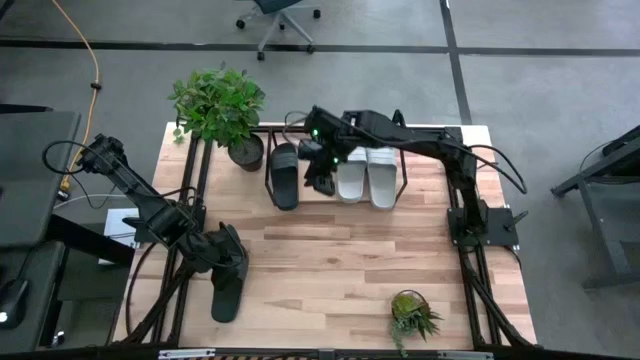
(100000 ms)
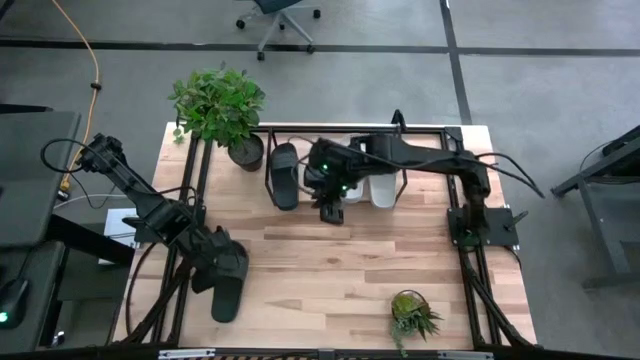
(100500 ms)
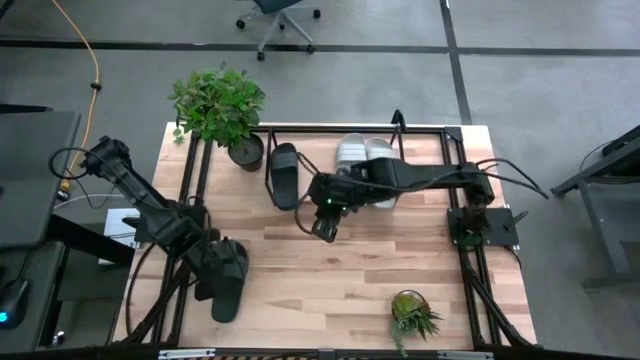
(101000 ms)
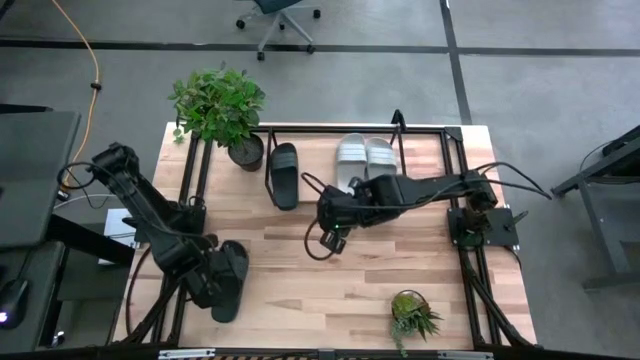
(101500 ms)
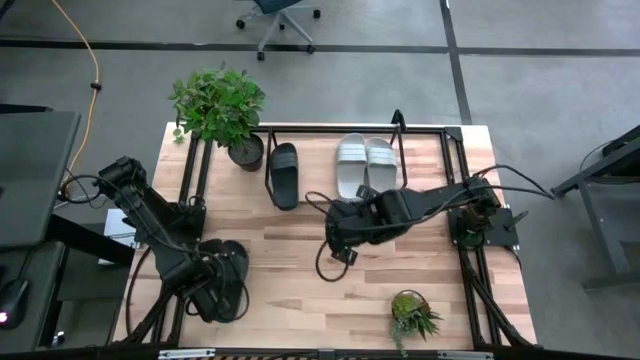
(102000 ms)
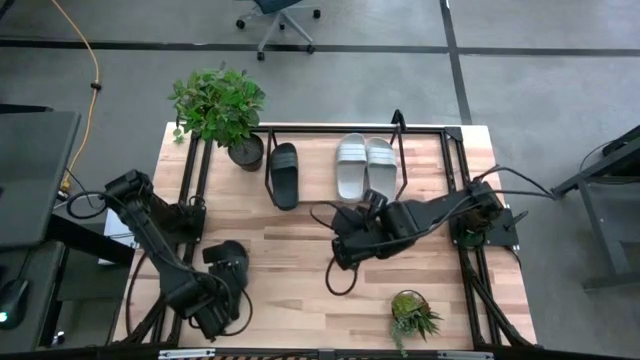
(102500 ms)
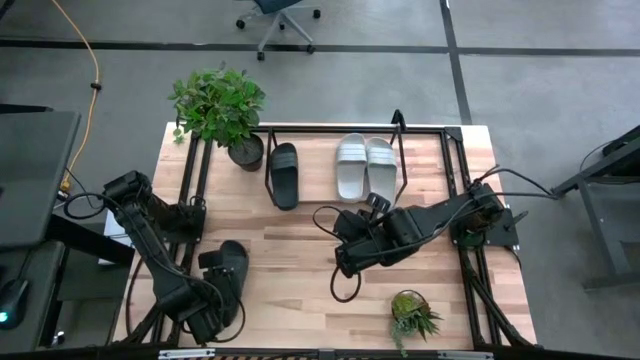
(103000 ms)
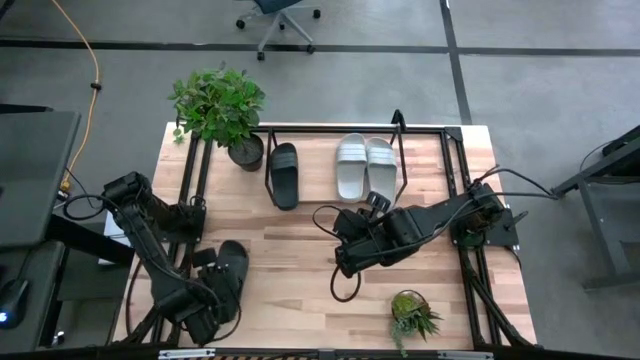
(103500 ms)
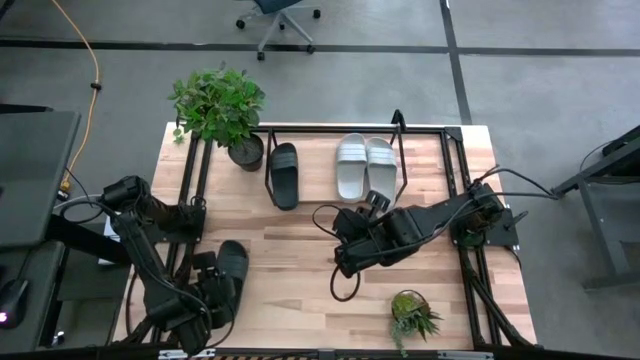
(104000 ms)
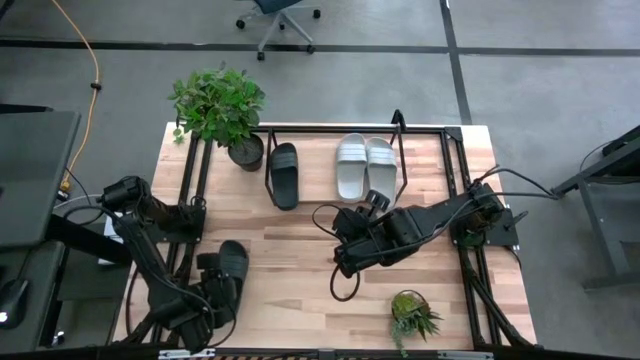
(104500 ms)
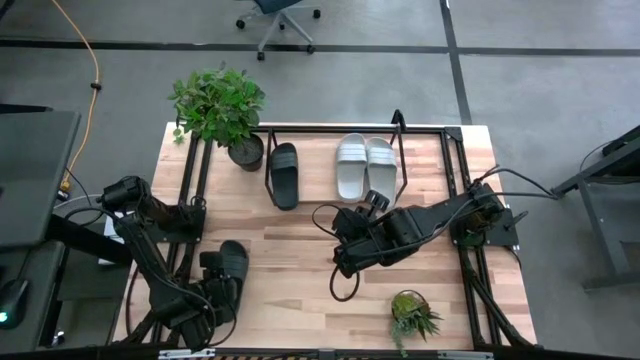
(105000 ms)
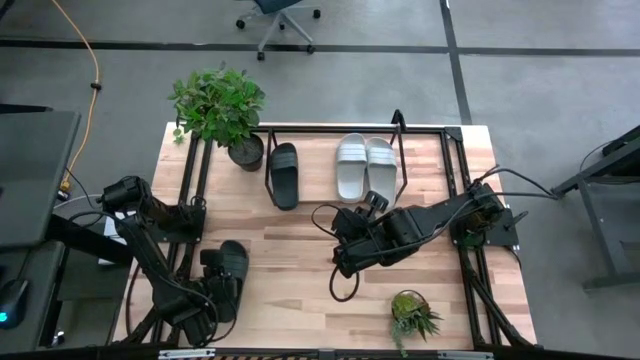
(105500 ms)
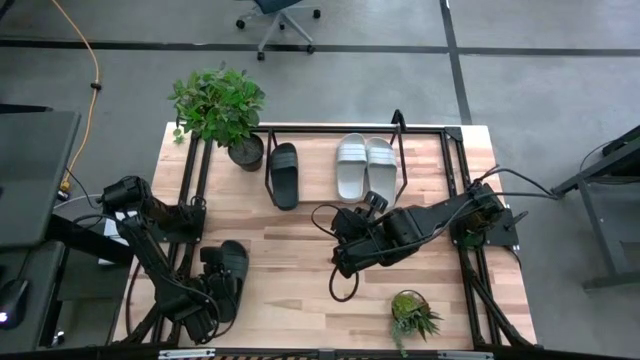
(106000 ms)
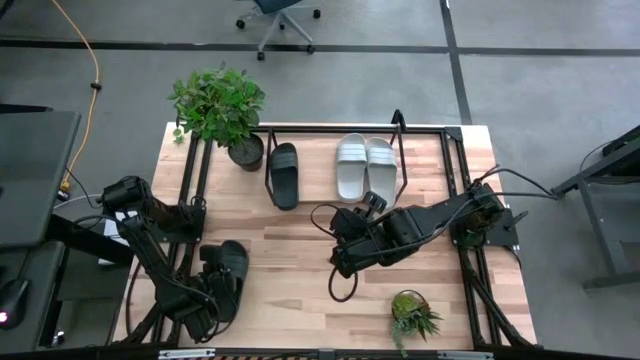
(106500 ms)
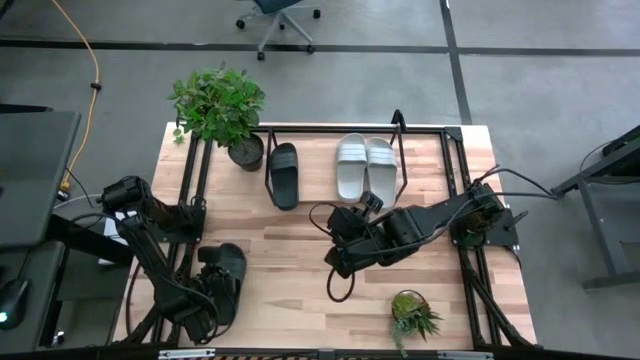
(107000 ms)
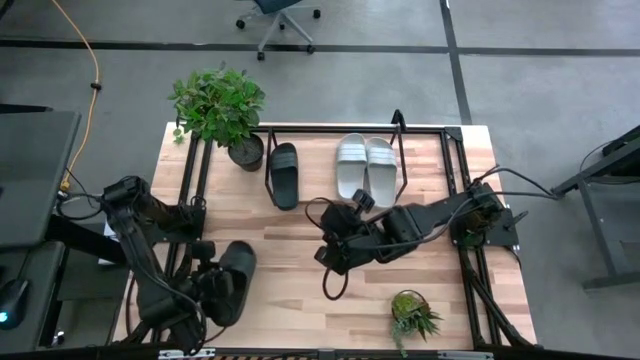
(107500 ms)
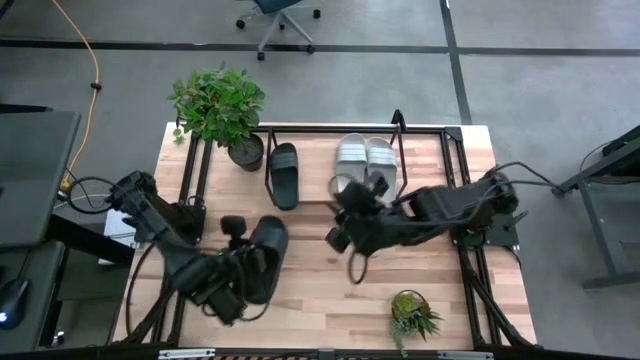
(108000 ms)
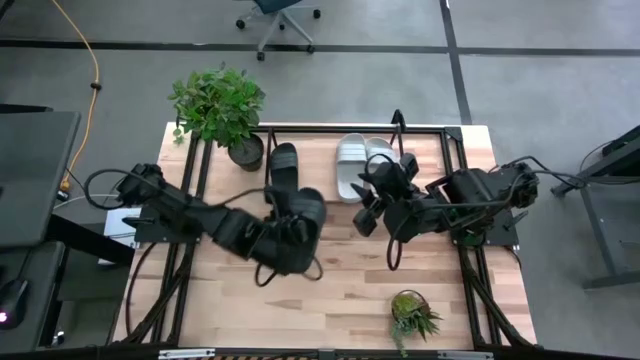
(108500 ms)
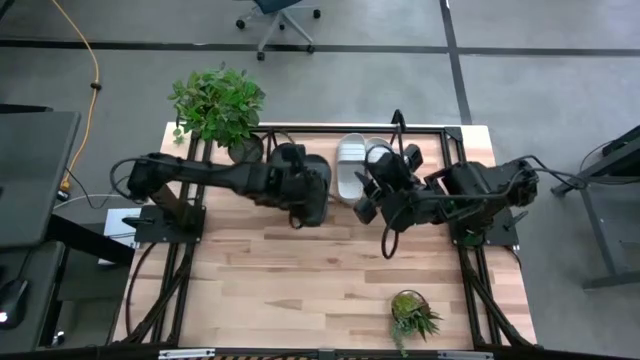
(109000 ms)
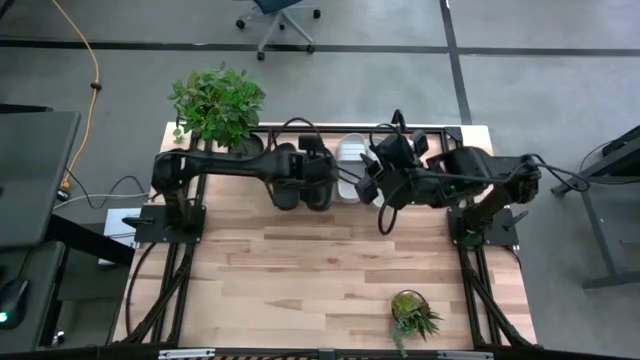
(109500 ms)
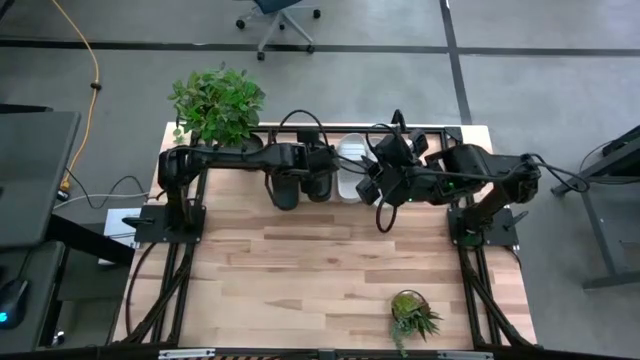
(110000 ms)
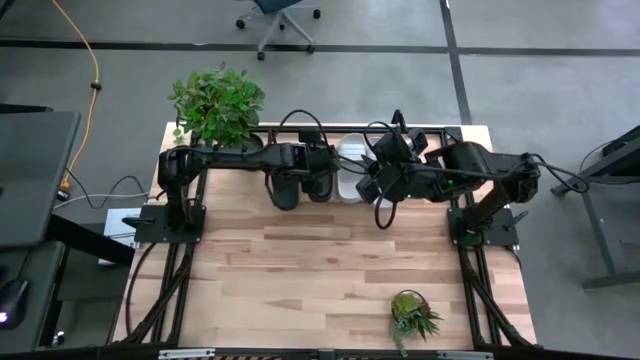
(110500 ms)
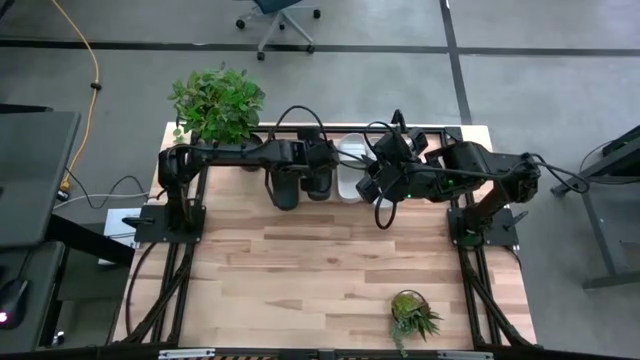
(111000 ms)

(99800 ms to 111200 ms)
Task: Pick and place slides into the shelf
Put the black slipper on the shelf

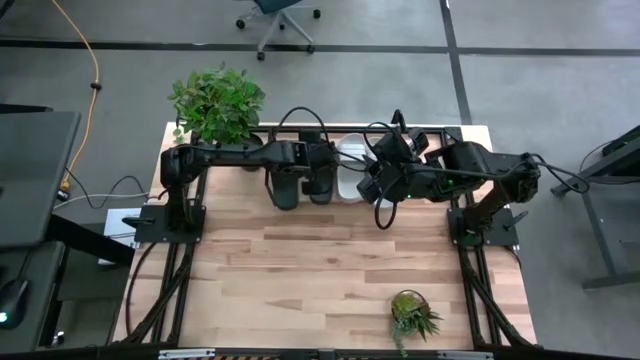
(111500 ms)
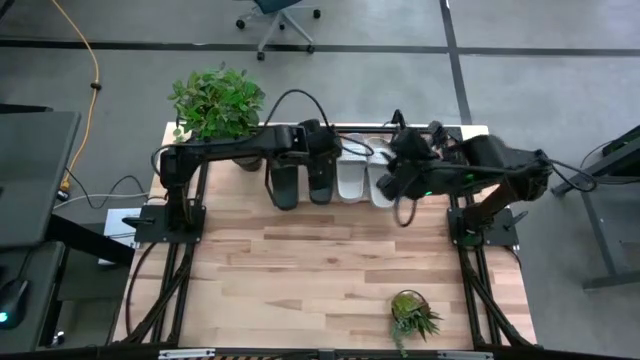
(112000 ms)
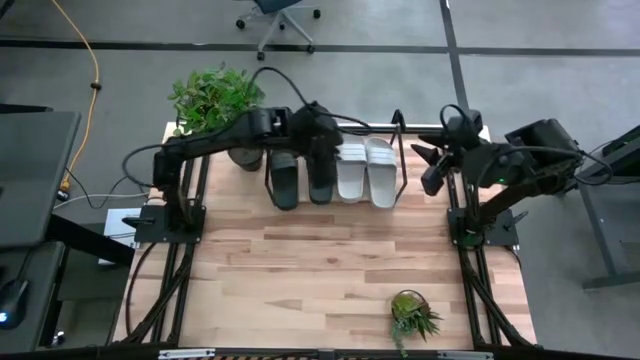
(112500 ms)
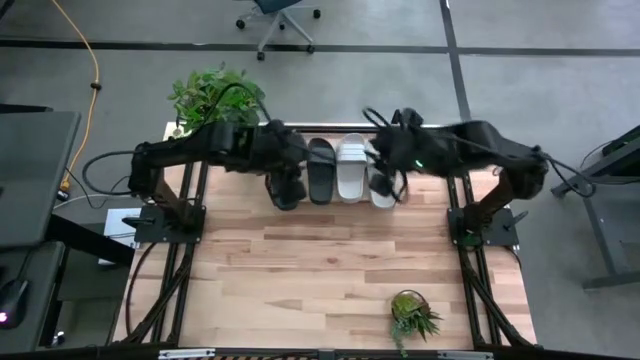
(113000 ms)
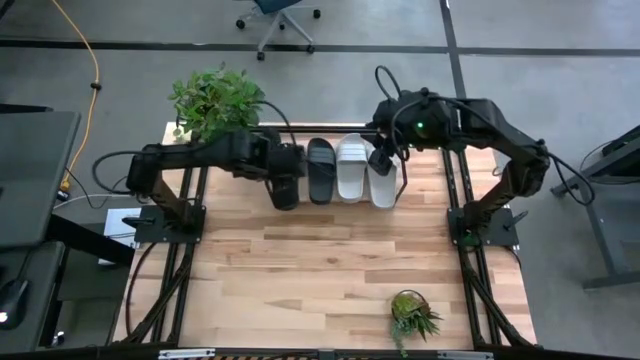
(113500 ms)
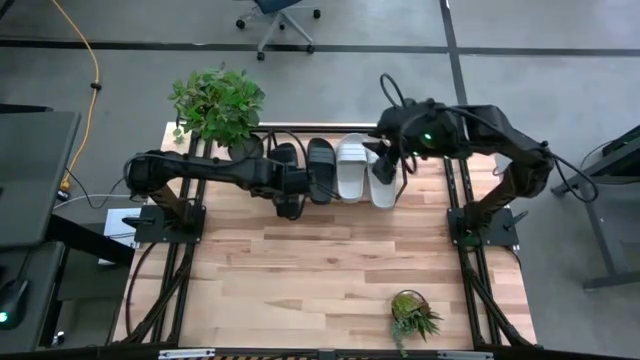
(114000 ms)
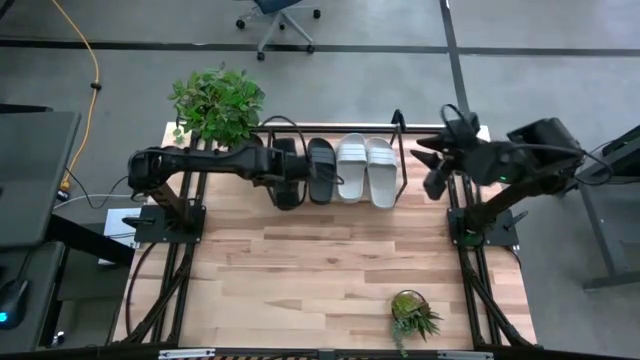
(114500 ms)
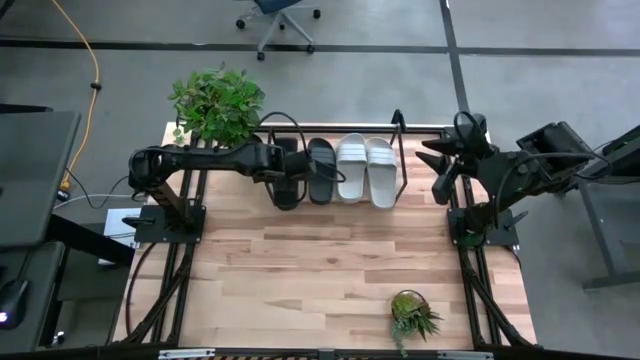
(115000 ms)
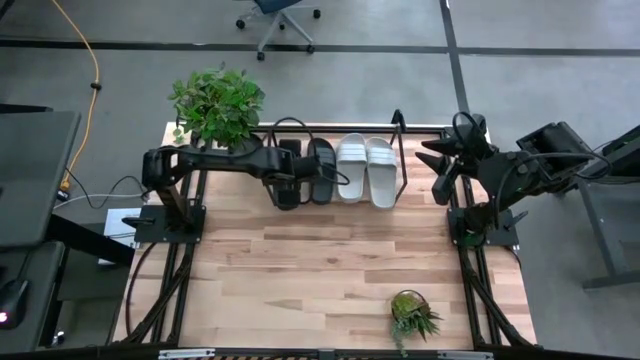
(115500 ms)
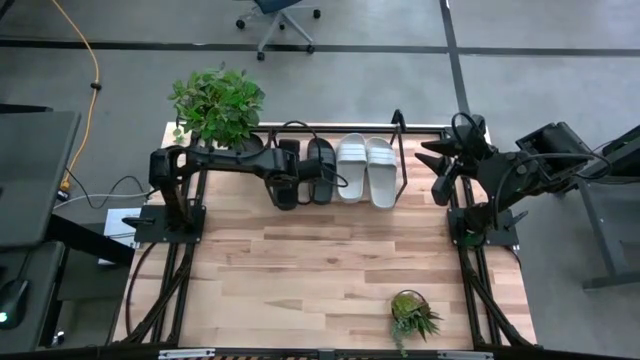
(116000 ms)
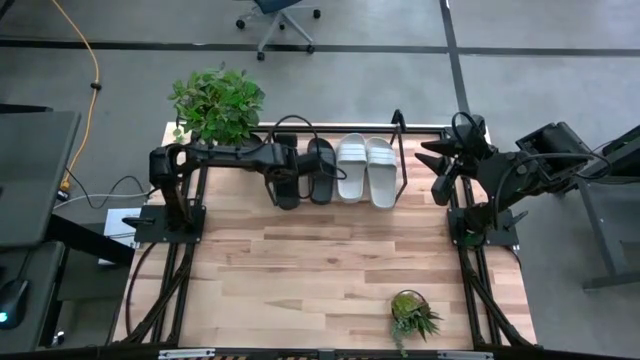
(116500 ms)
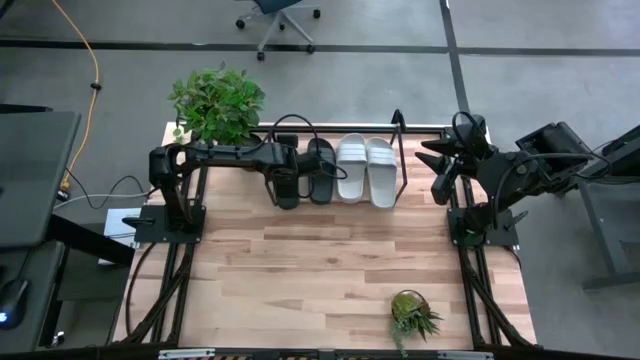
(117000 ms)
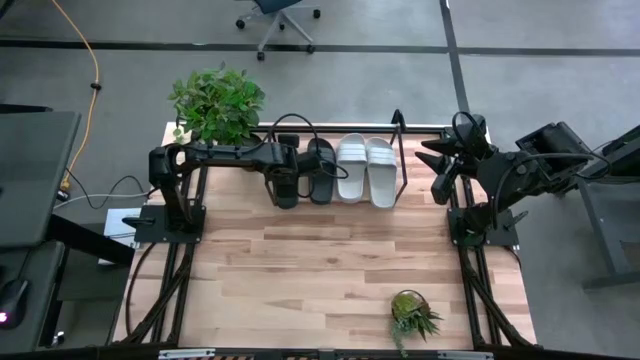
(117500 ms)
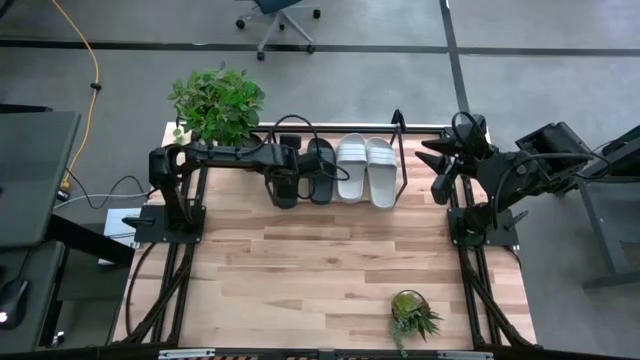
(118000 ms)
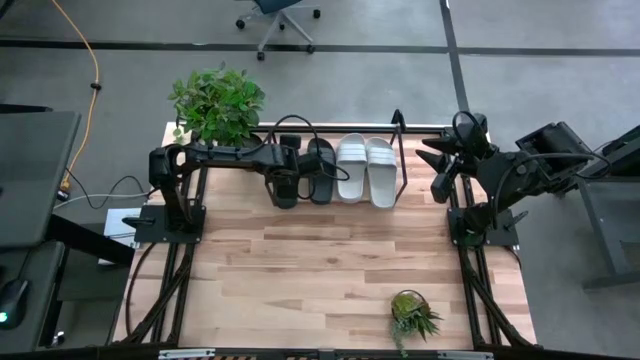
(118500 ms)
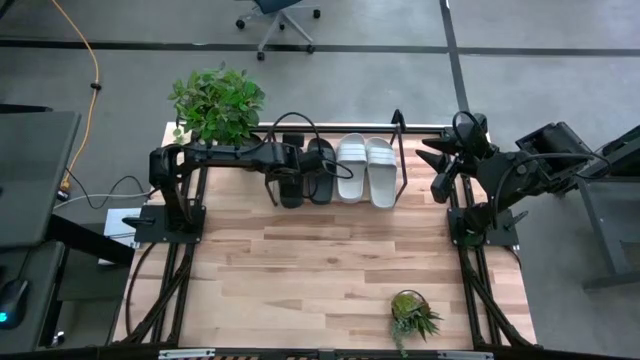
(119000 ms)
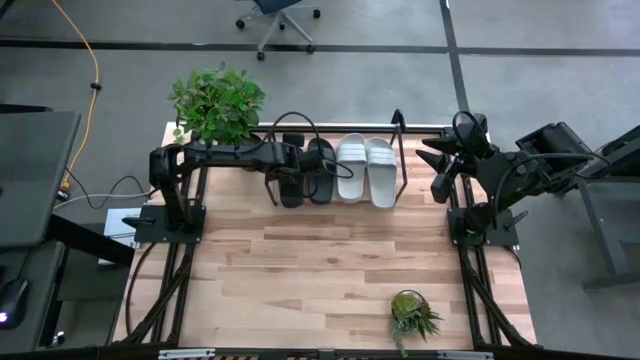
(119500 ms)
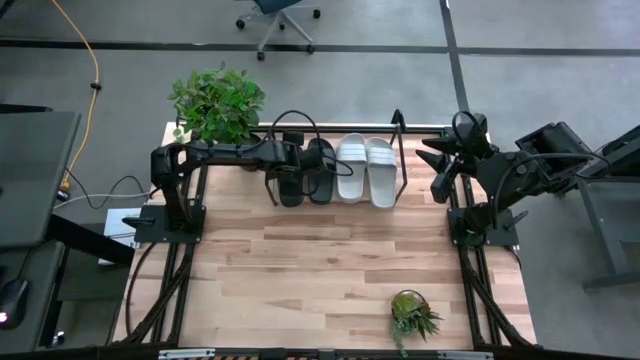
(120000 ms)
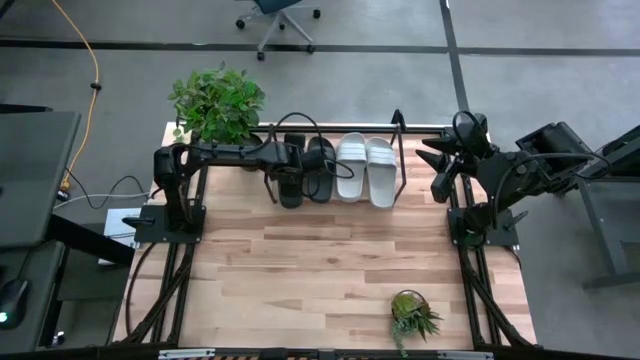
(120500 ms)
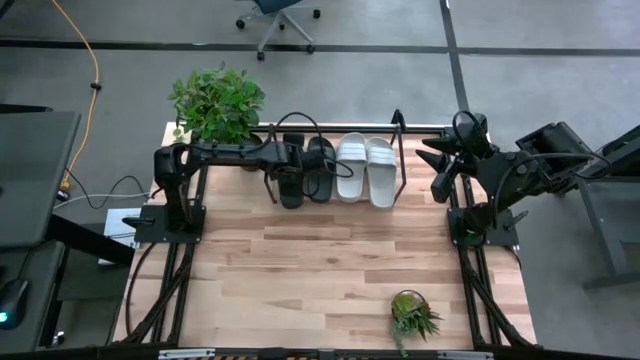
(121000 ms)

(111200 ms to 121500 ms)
Adjust the black slipper on the shelf
